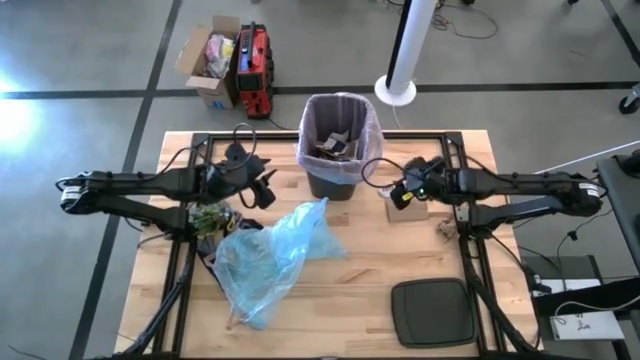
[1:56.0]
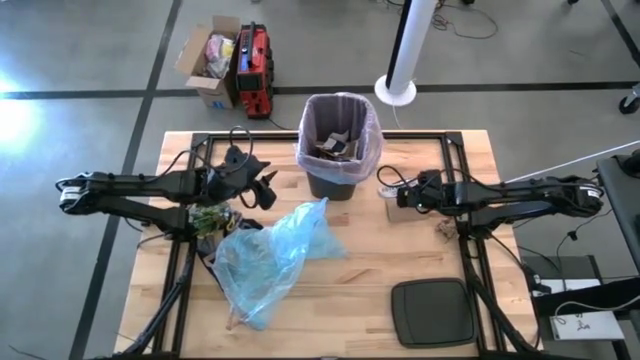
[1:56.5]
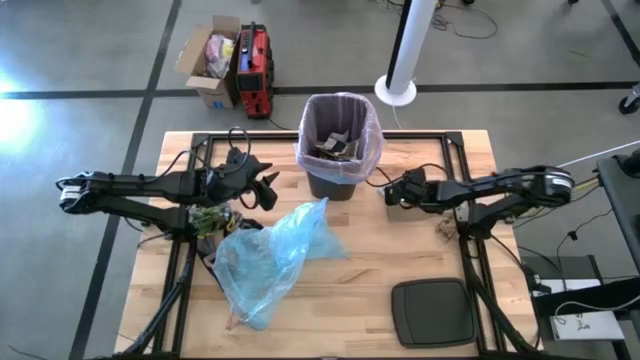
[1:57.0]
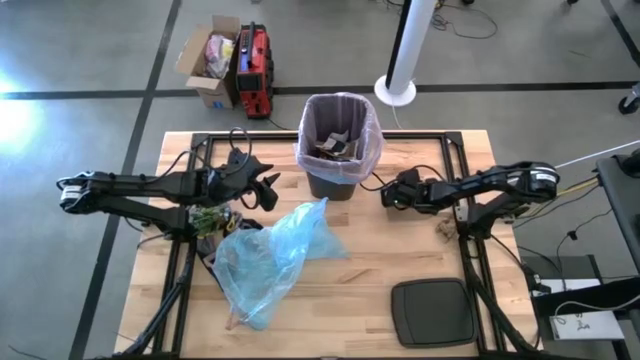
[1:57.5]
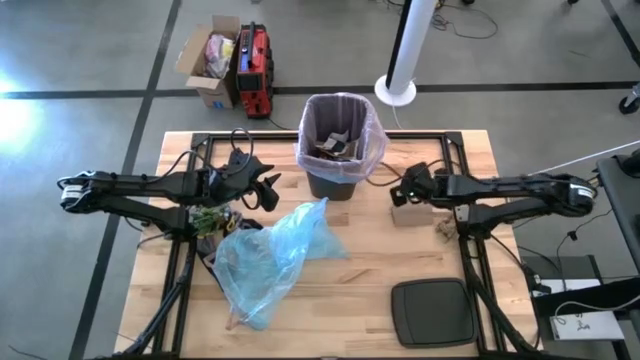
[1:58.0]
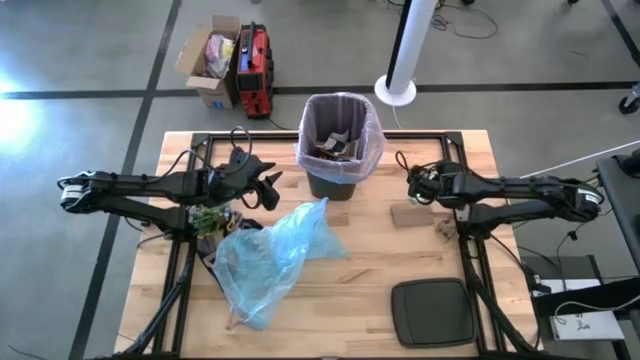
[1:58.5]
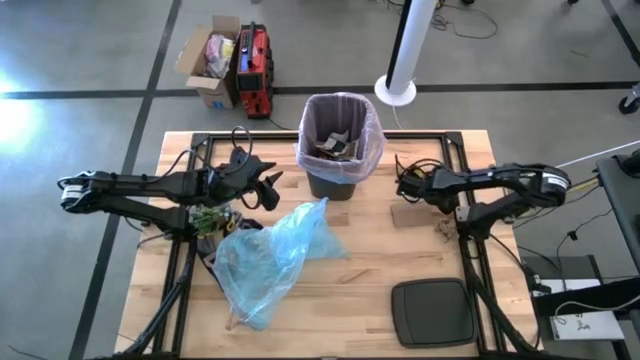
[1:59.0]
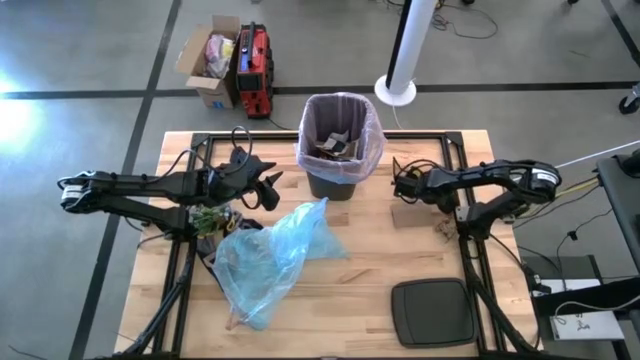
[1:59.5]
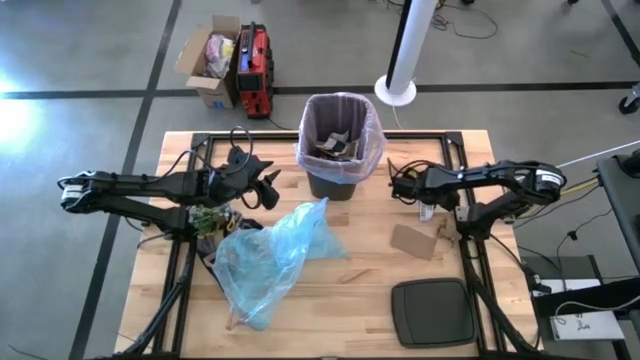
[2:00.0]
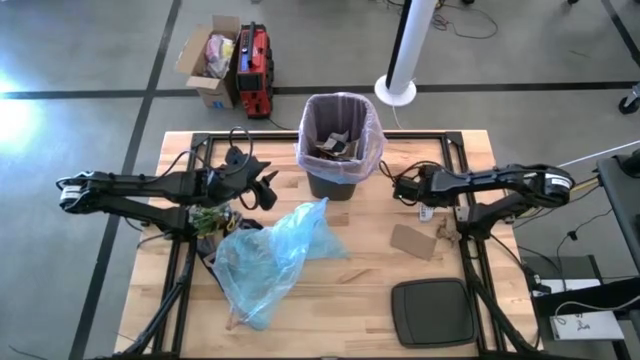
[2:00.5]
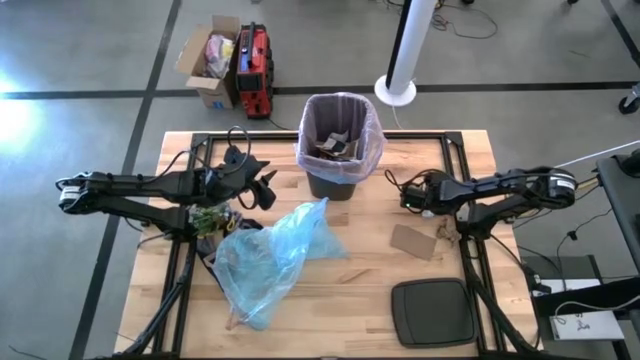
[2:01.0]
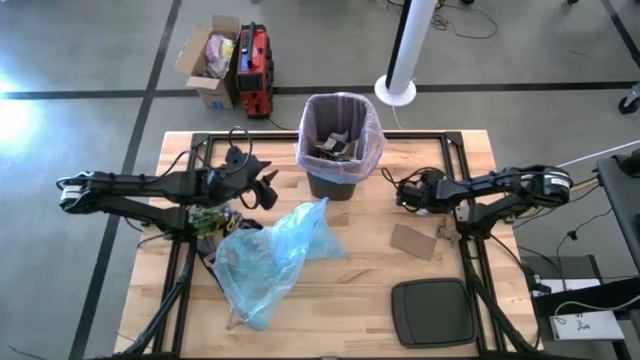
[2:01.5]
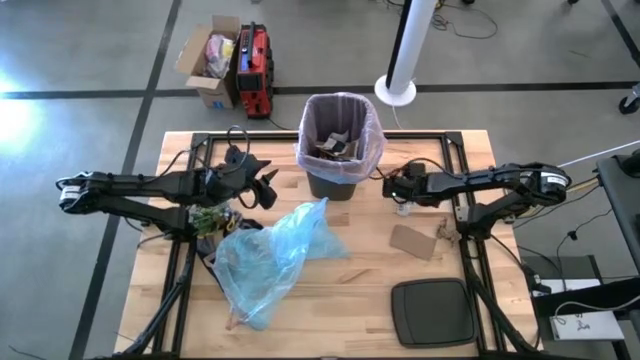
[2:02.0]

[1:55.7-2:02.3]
Task: place trash/remove bag and relplace
Put the white paper into the trash bin

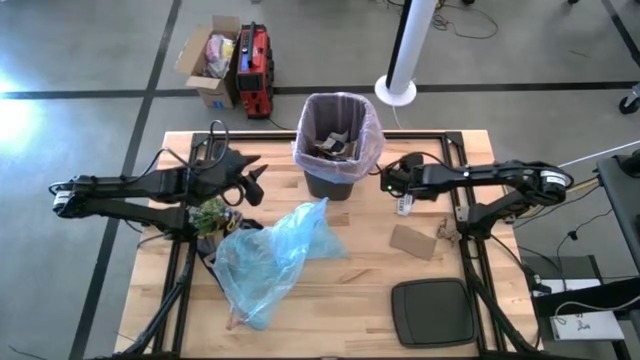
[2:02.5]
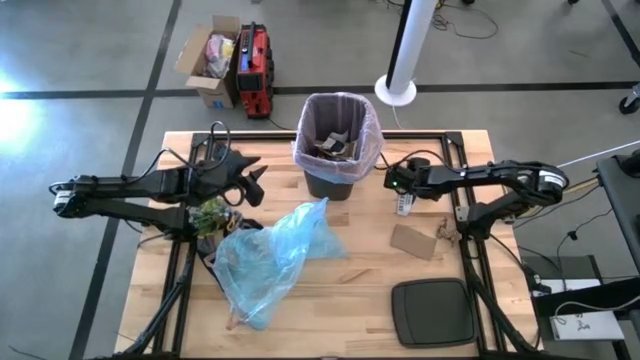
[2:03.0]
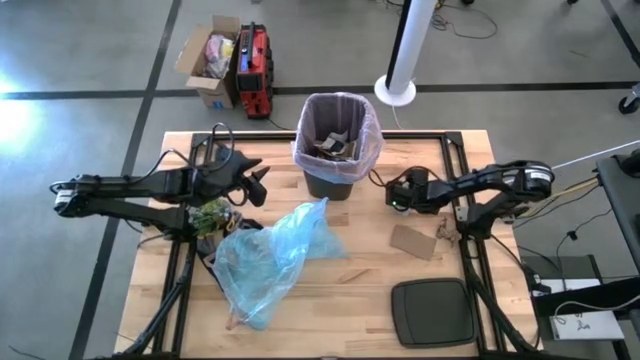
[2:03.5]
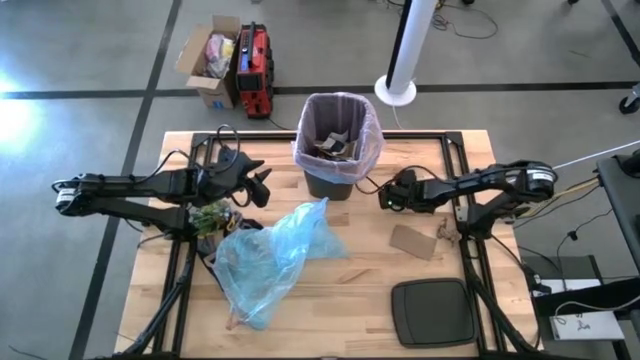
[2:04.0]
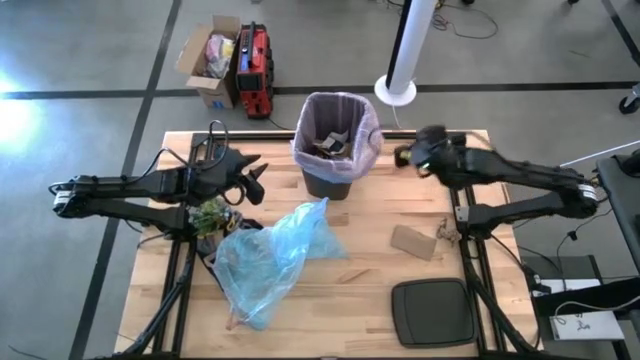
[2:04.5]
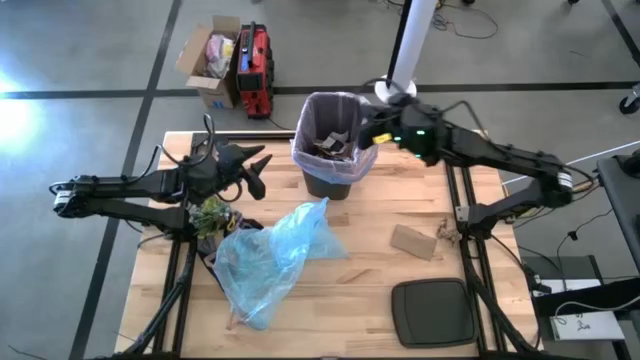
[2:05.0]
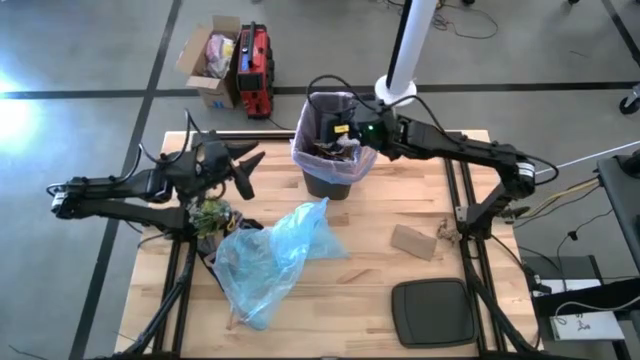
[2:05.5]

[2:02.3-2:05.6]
Put the white paper into the trash bin

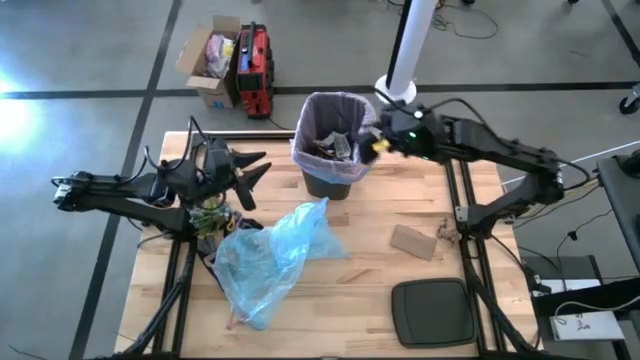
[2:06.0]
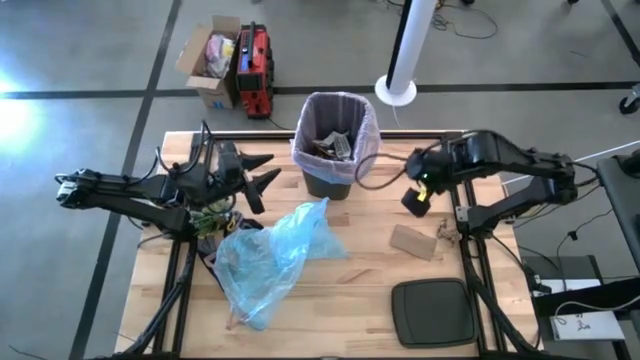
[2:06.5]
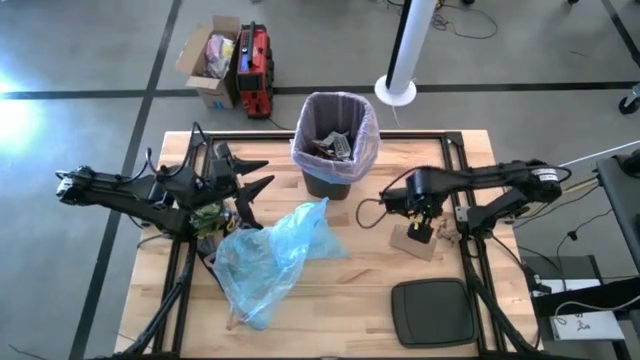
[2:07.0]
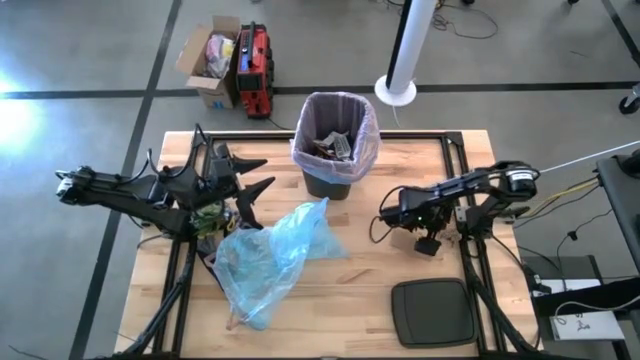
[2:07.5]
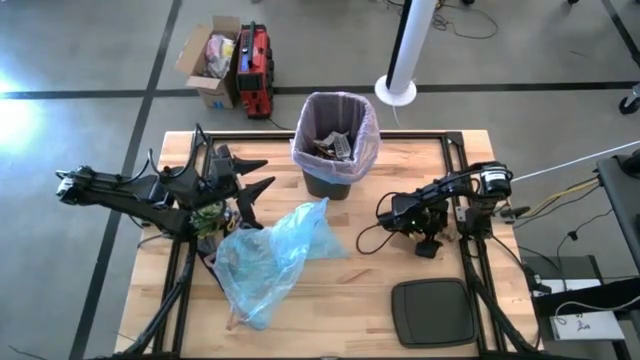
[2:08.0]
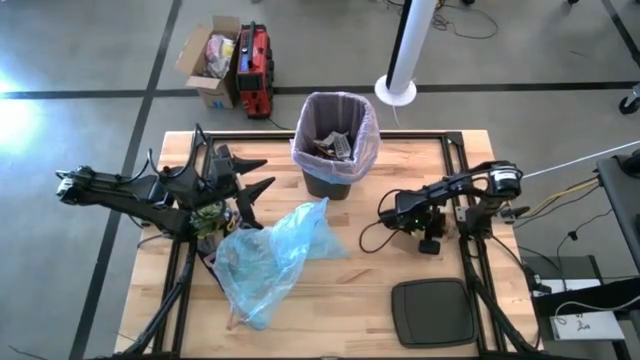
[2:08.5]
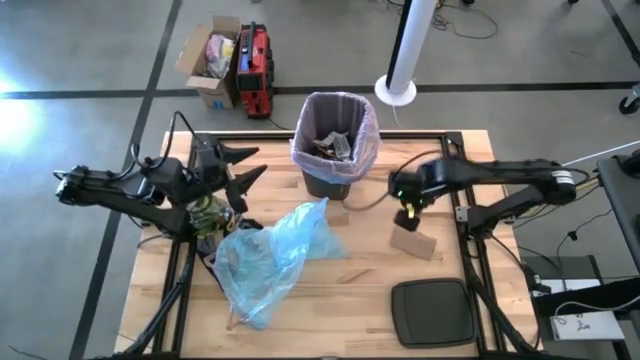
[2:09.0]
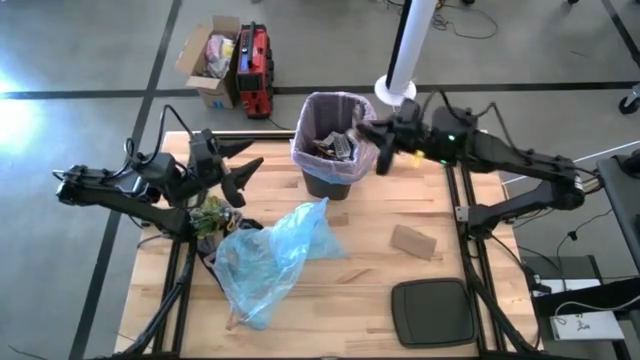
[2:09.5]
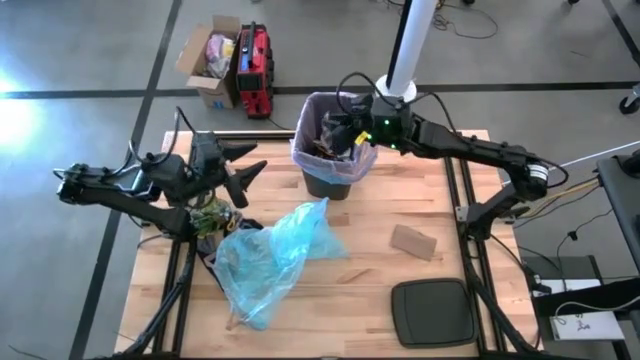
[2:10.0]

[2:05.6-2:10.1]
Put the brown napkin into the trash bin

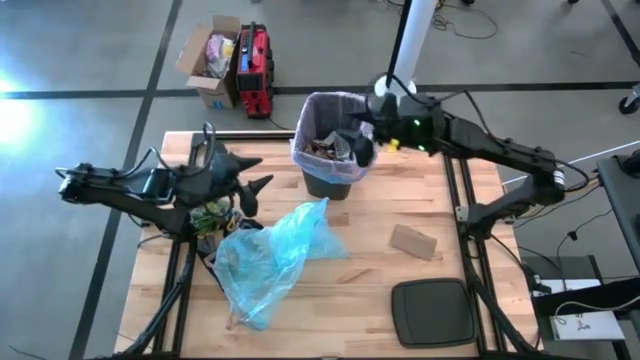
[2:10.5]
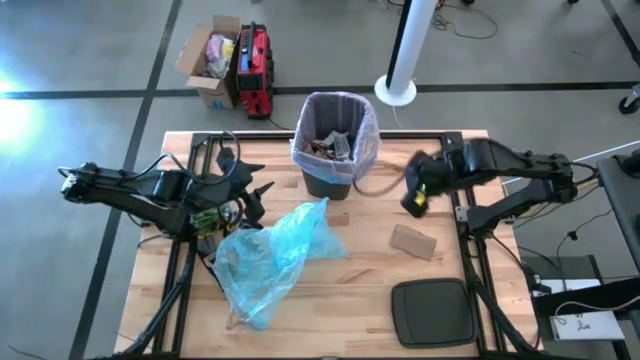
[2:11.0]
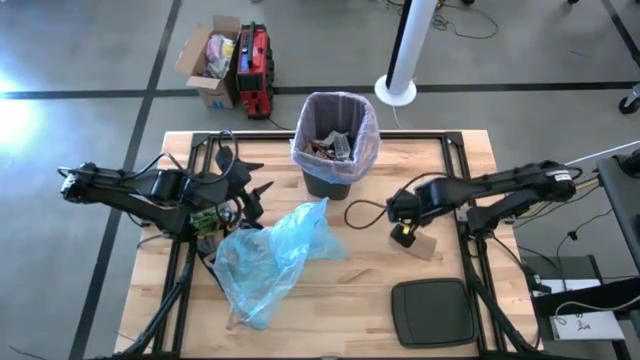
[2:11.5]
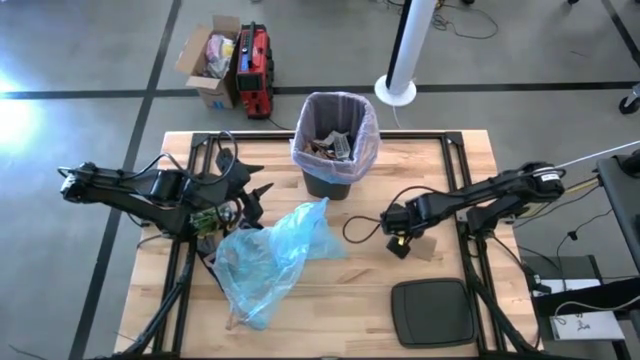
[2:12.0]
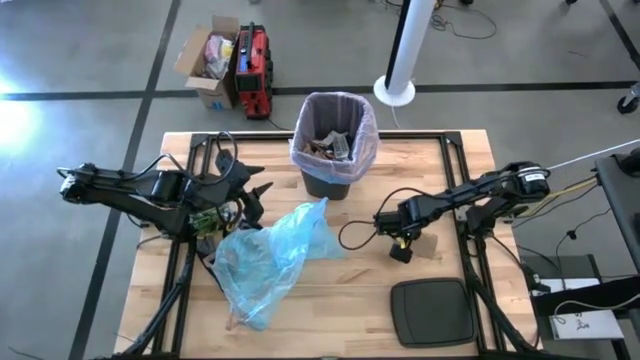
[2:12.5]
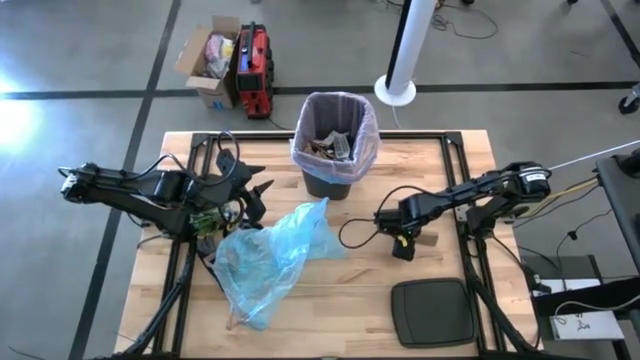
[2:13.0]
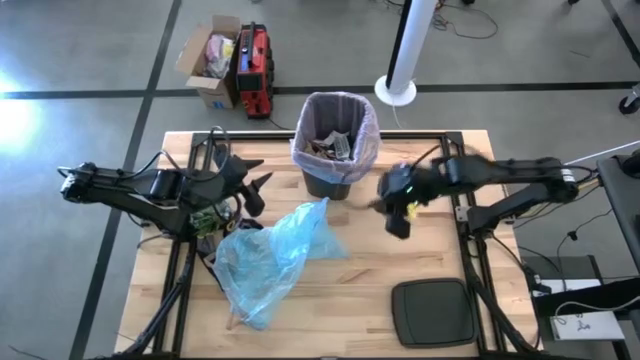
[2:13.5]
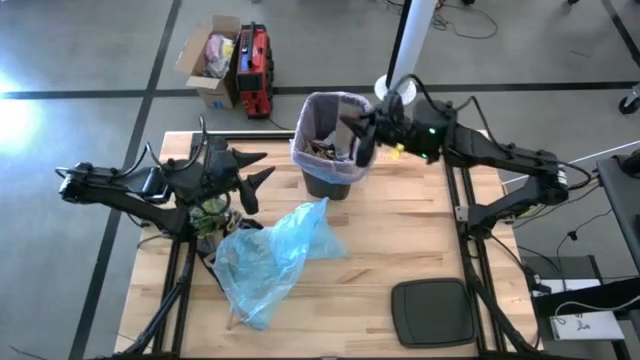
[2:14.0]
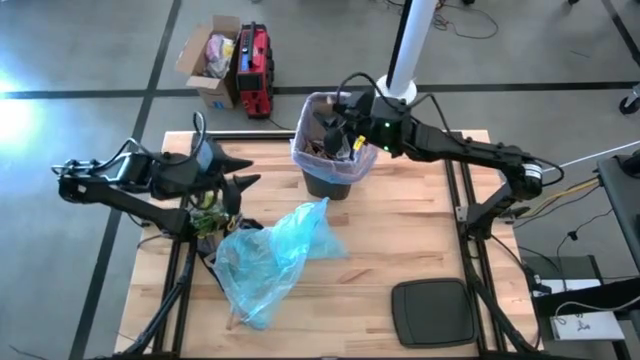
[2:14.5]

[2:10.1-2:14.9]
Put the brown cardboard into the trash bin

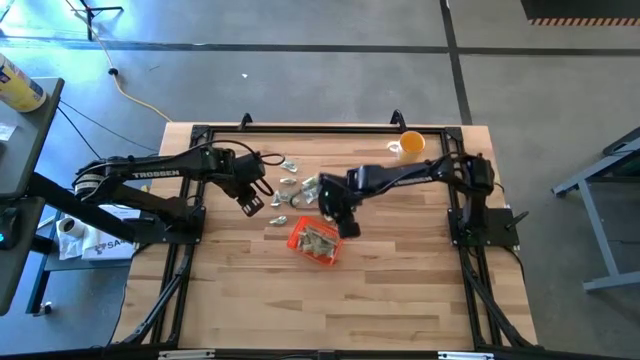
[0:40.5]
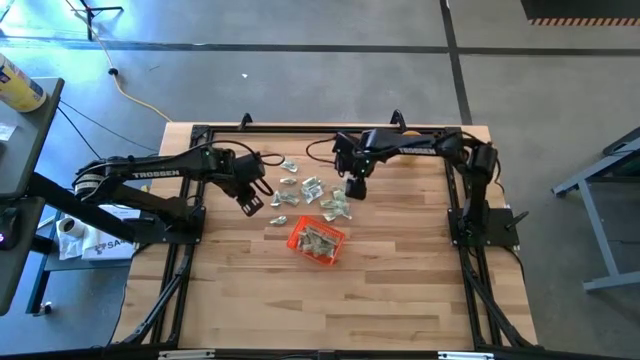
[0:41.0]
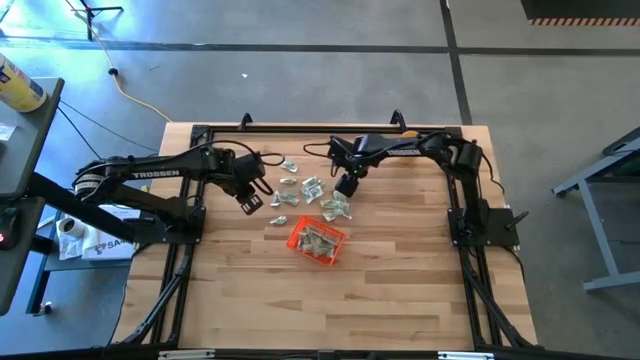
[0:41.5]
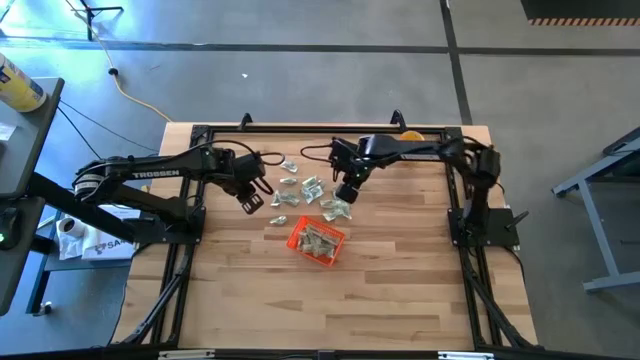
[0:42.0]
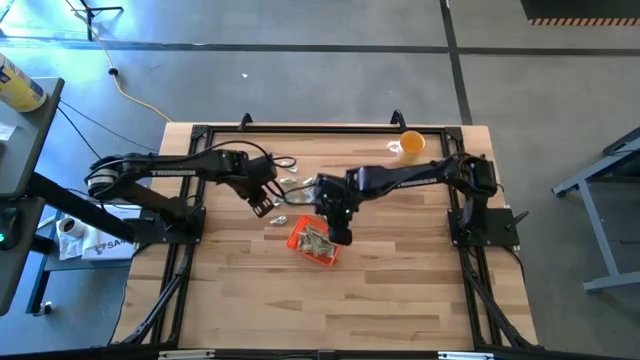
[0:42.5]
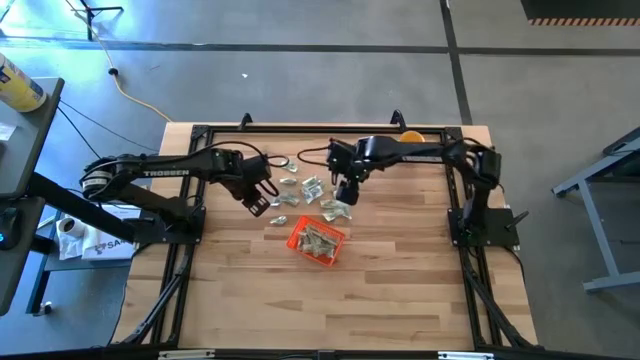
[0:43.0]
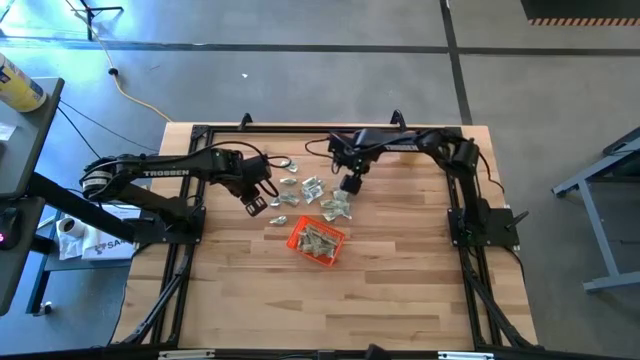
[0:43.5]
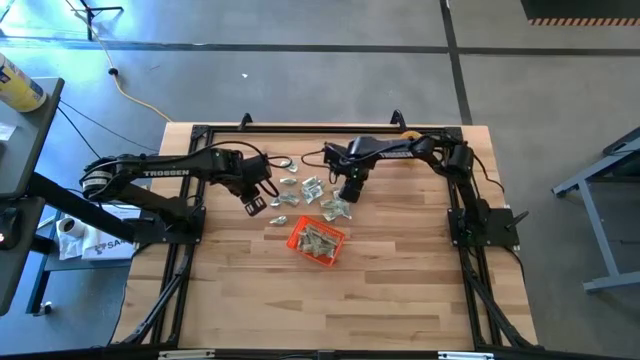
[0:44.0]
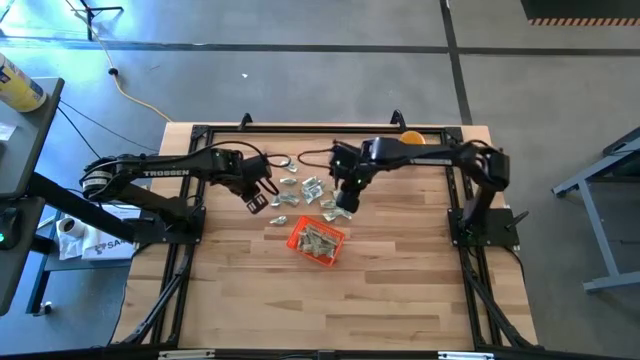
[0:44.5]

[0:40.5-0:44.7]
Task: Pick and place Stevia / Truvia into bins
Put the stevia packet into the orange bin
